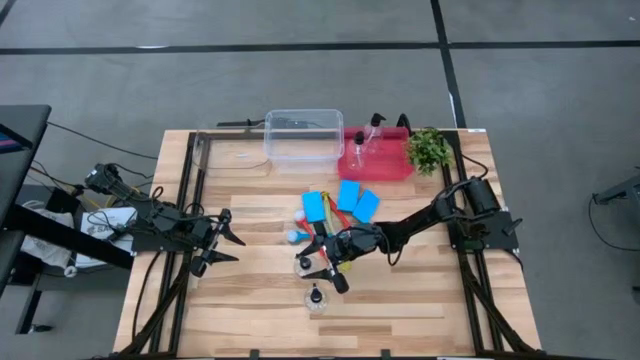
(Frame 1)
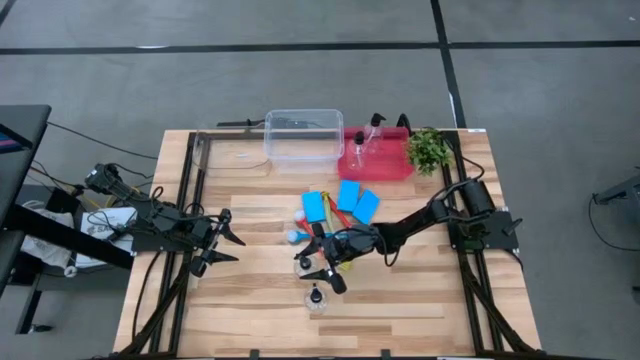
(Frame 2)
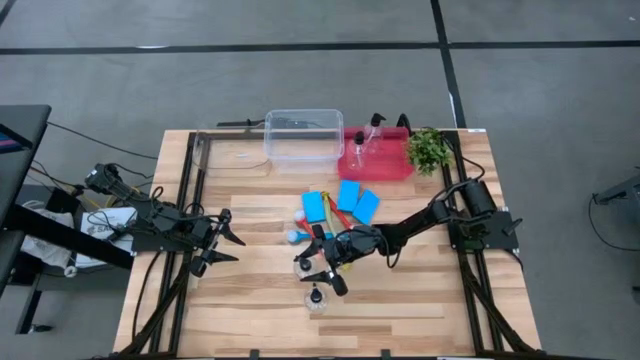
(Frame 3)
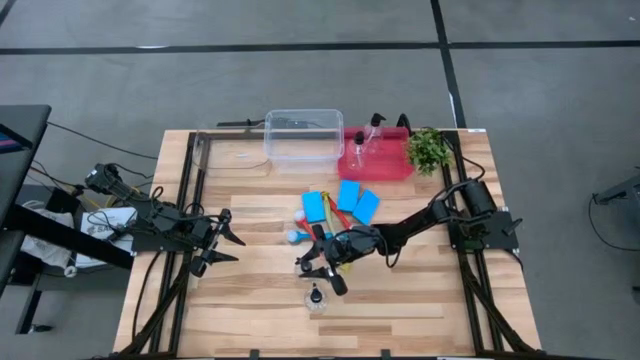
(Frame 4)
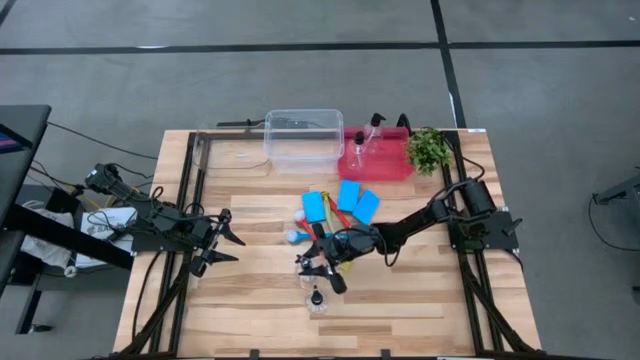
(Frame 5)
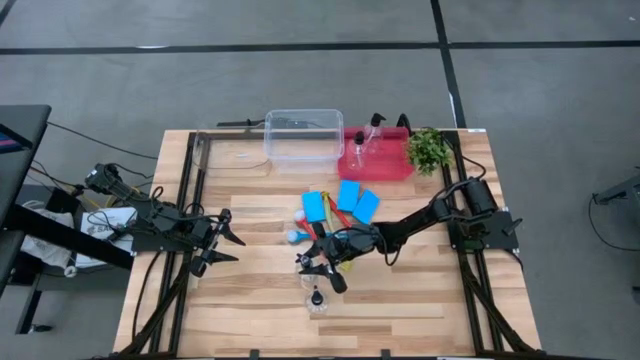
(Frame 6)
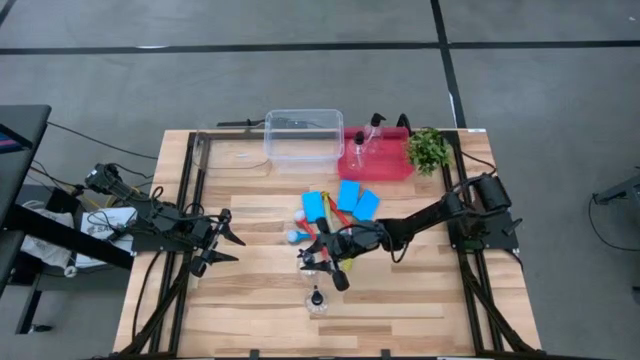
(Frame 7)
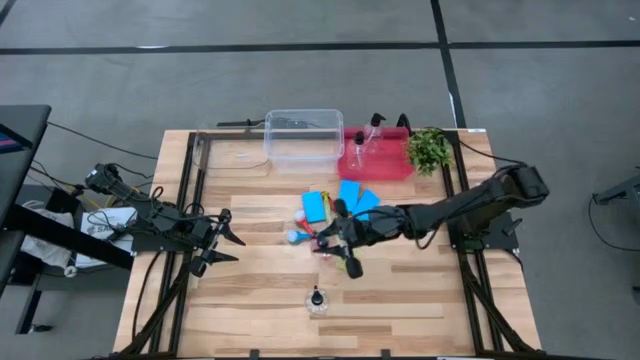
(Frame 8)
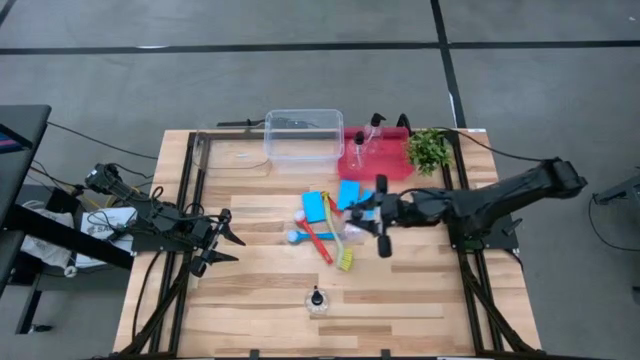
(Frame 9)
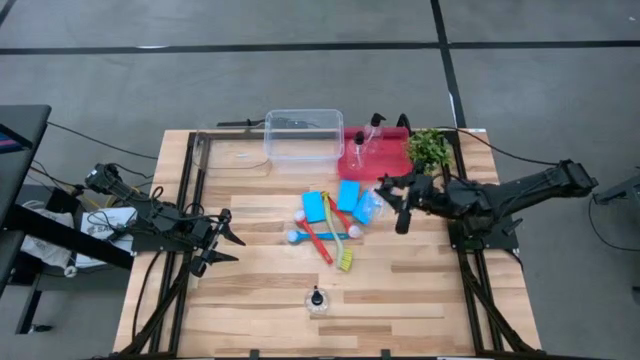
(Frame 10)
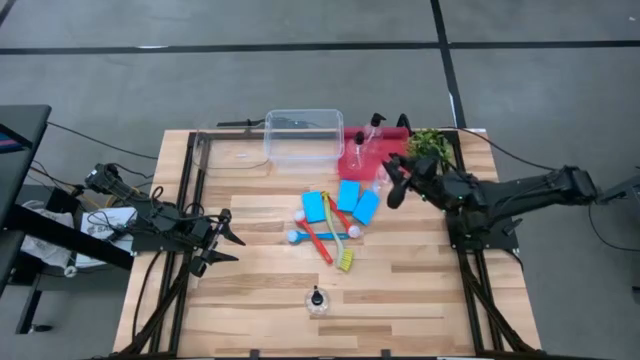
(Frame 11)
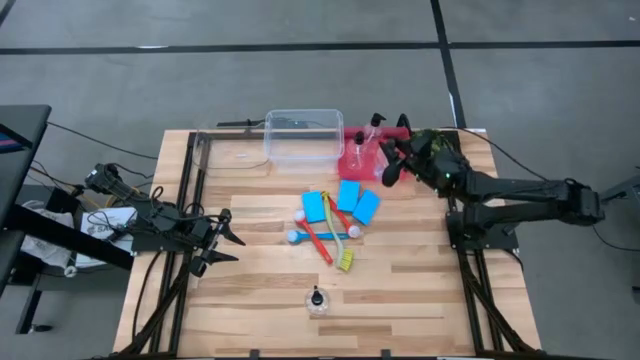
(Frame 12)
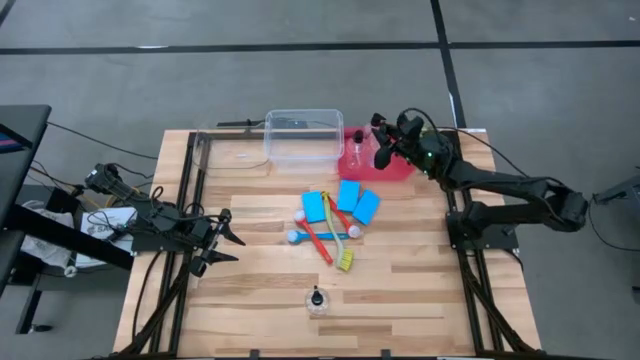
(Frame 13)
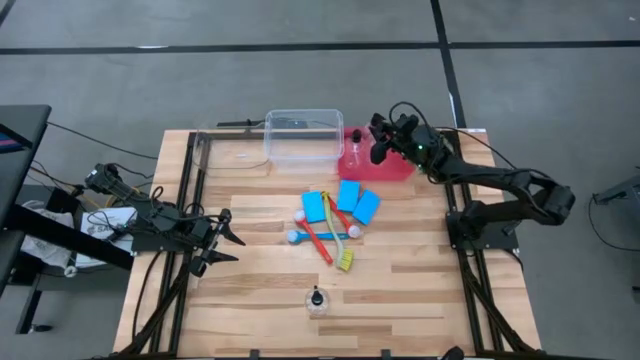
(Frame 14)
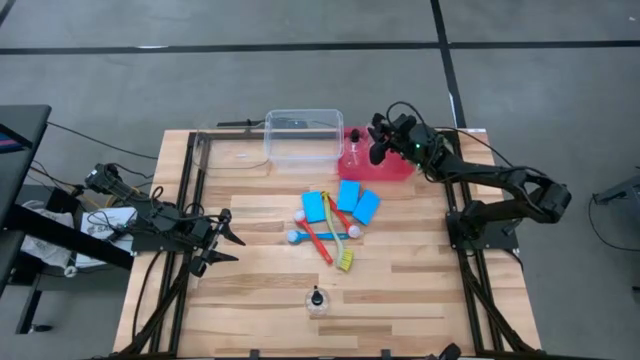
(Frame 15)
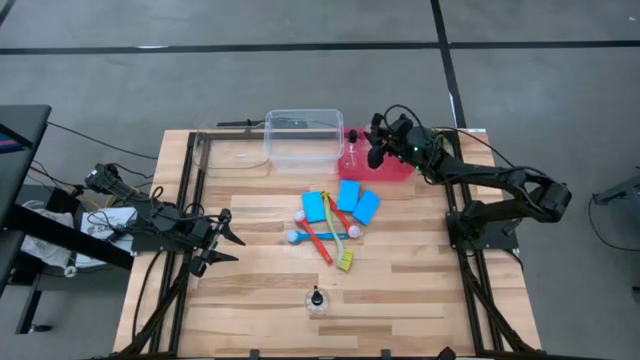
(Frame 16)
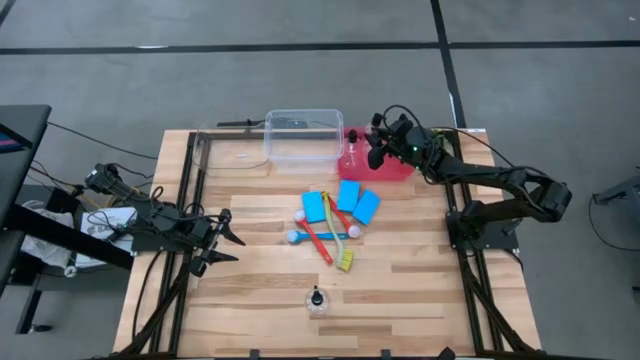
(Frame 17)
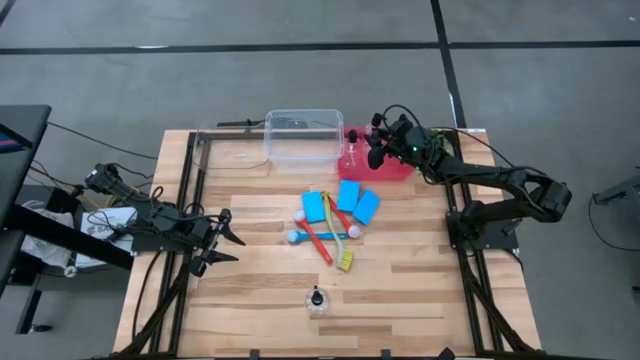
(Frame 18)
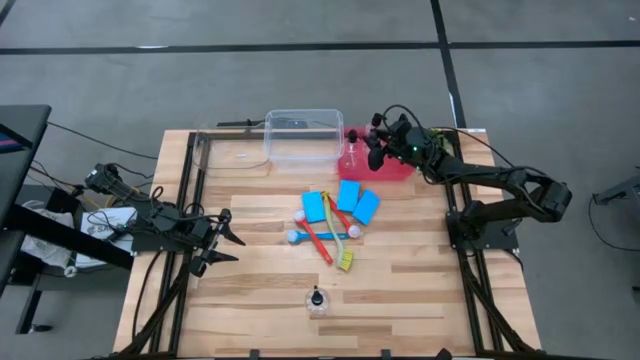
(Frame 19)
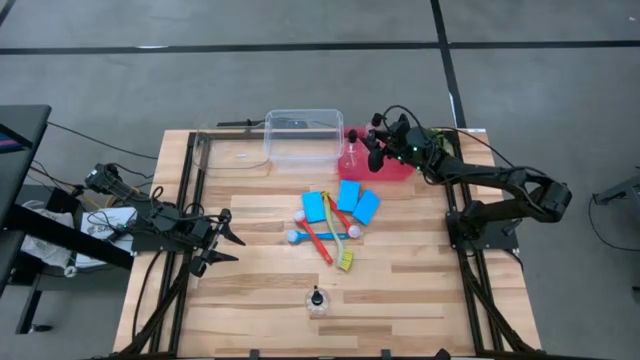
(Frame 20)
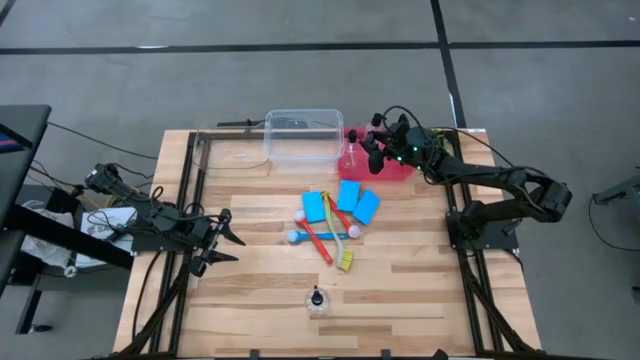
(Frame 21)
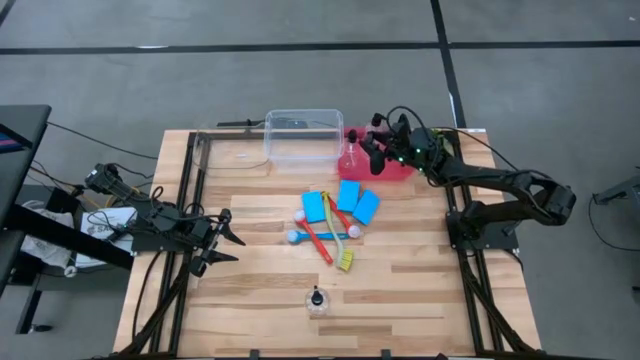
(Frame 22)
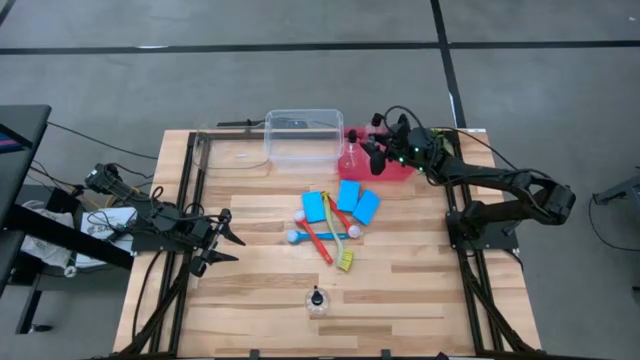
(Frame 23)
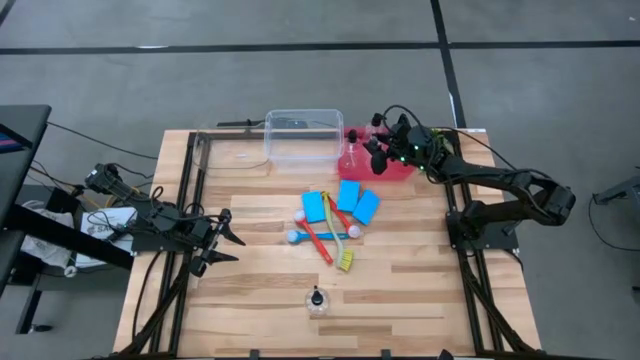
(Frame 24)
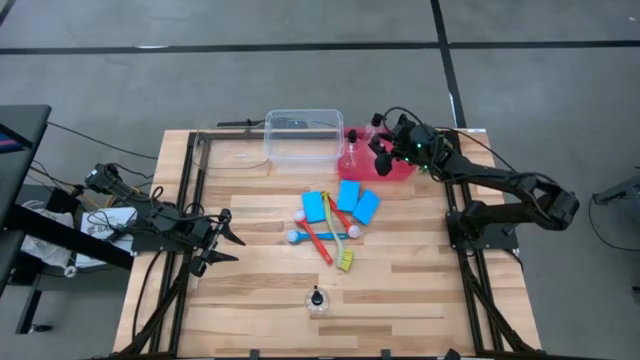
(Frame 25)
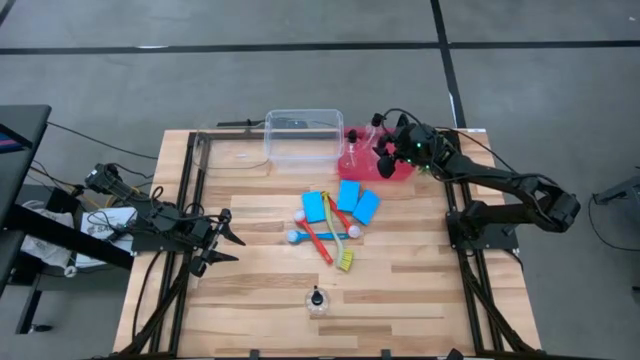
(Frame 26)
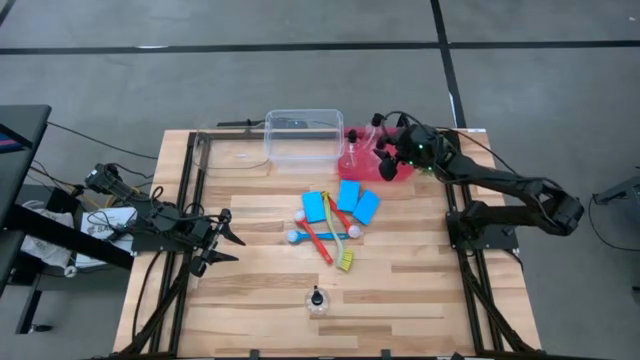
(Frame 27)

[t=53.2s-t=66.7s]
Task: Pick & Place Kitchen Sink Supplies
Put the transparent bottle into the red bin

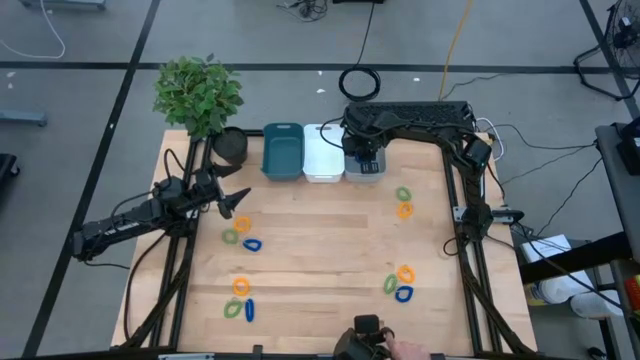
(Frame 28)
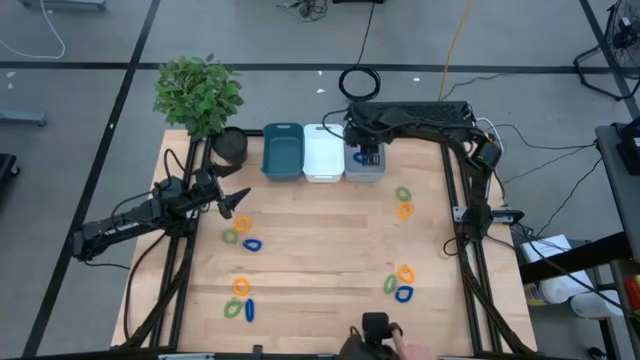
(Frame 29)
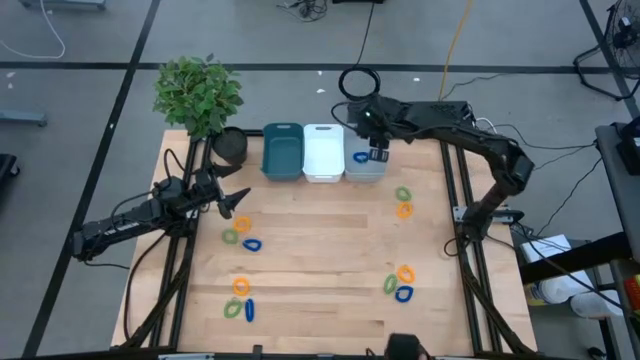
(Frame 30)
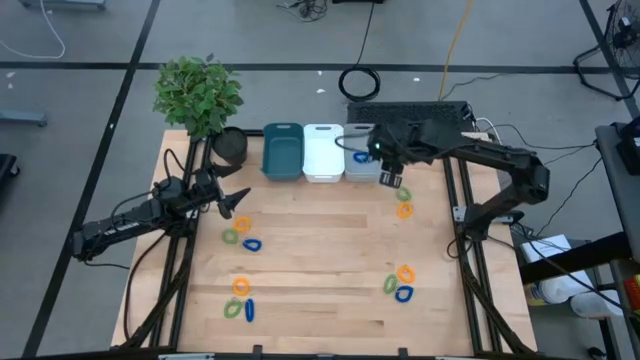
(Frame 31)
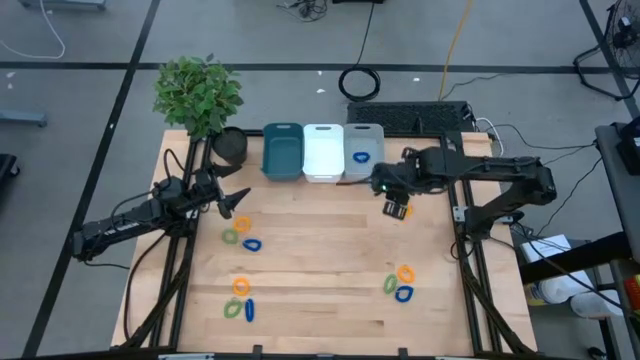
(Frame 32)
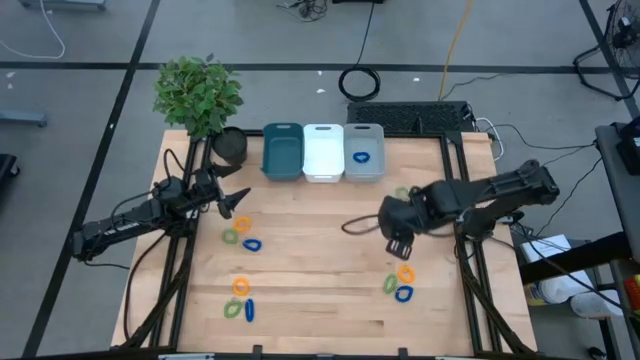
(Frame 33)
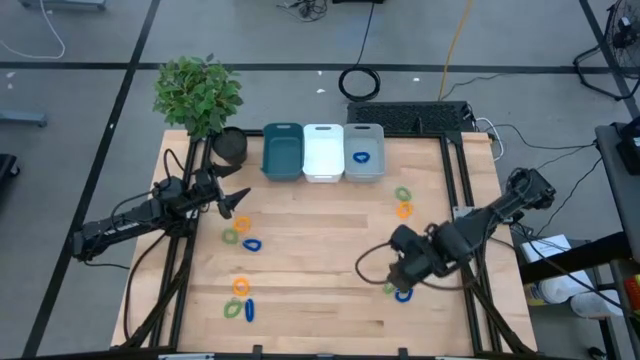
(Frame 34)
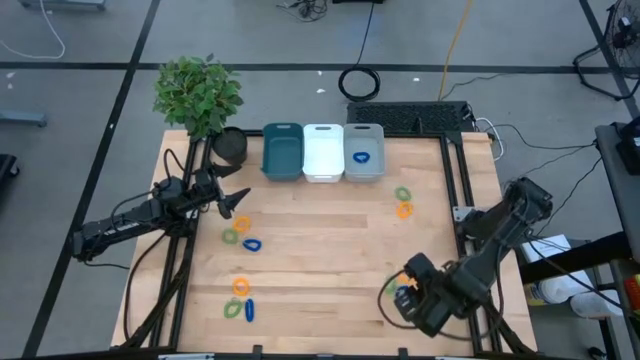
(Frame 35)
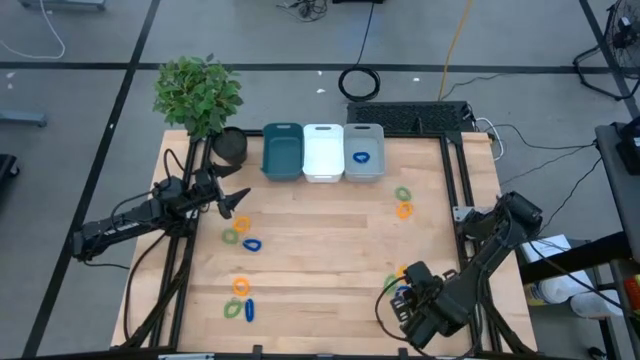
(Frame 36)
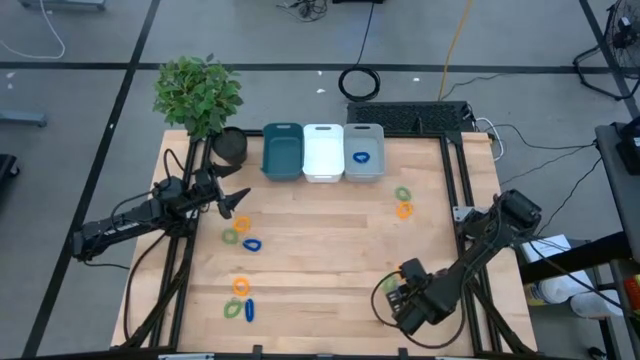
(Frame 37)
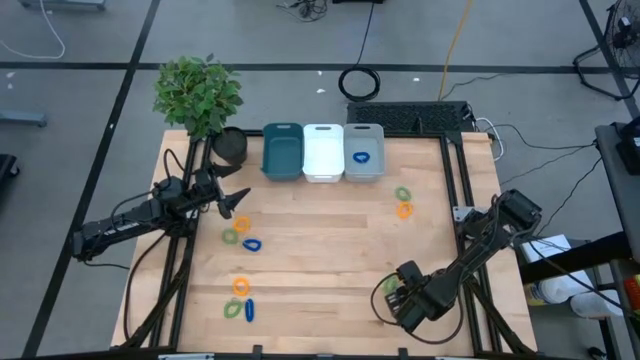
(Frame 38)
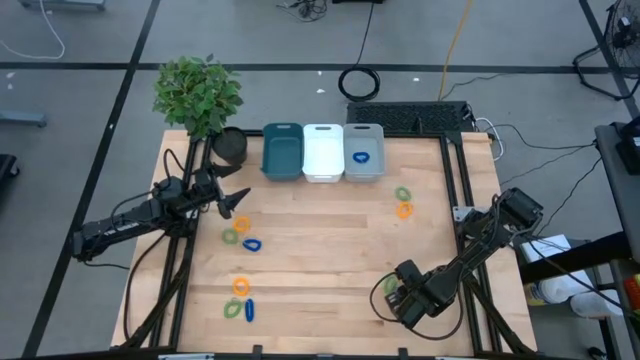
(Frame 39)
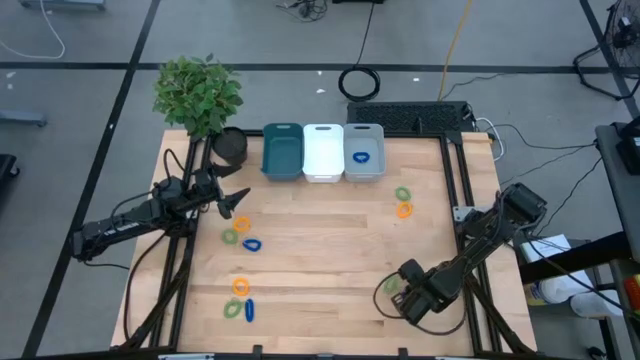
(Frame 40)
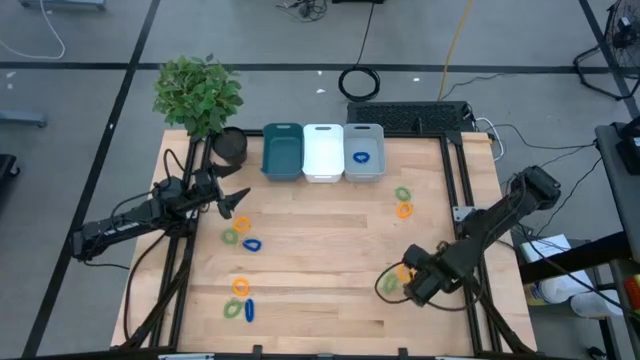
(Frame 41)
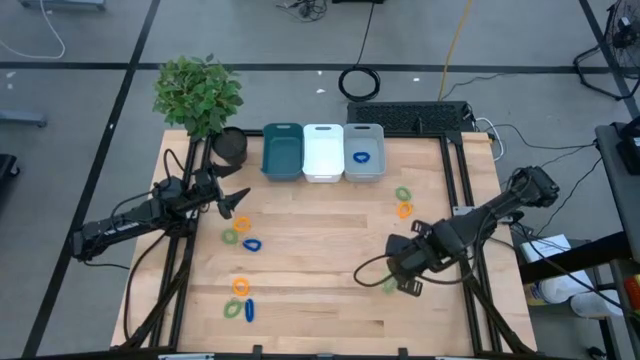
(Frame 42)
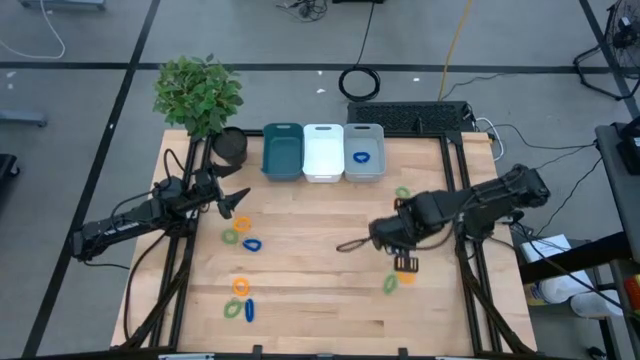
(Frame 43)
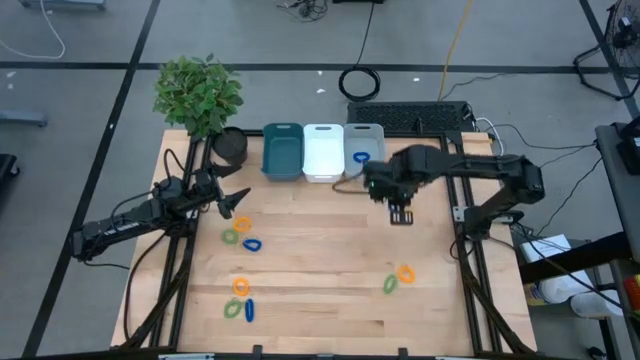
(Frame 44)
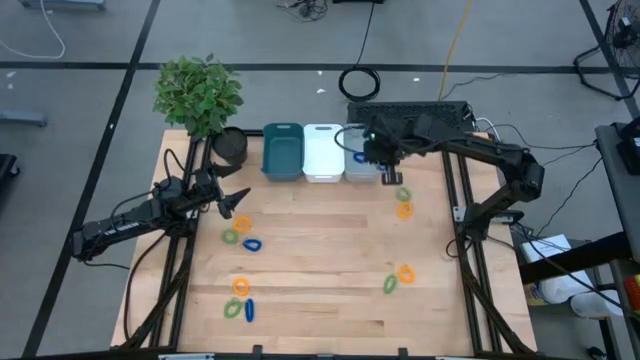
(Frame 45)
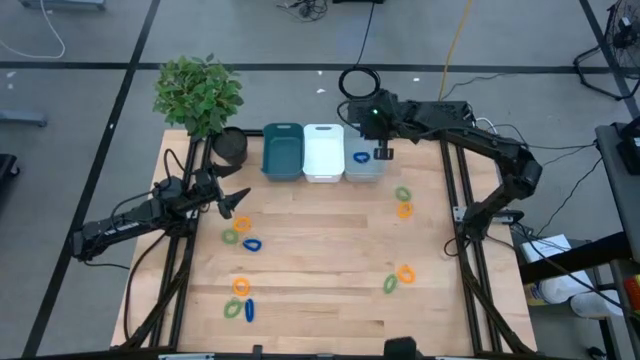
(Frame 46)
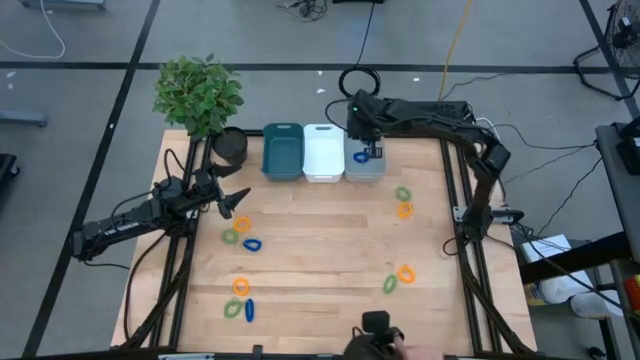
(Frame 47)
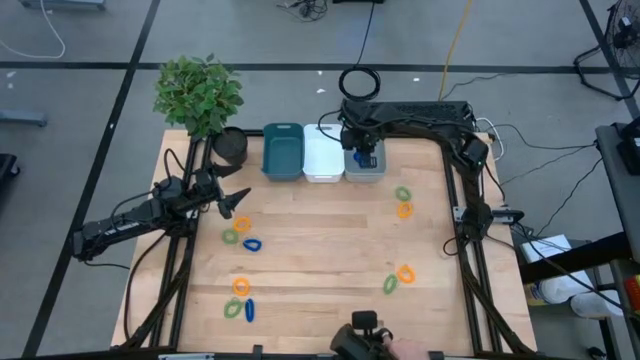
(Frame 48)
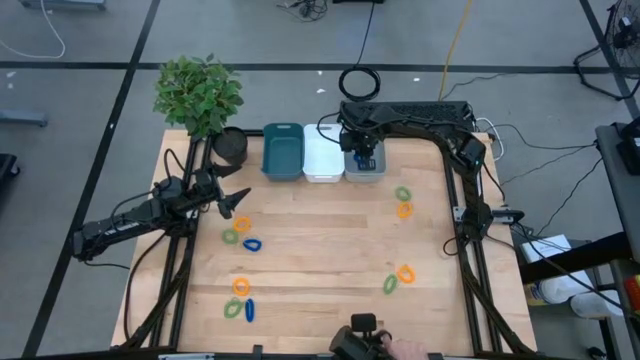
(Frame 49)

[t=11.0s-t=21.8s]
Task: Sort spring keychains
Put the blue spring keychain in the gray bin
